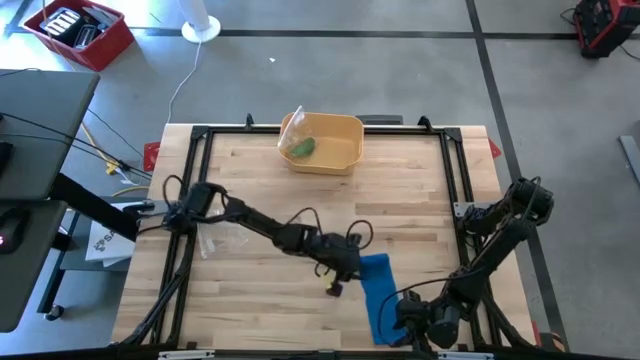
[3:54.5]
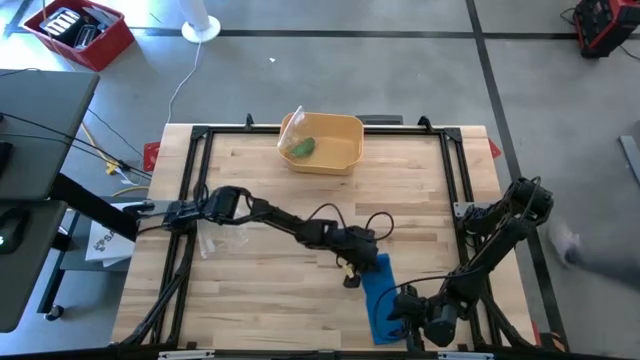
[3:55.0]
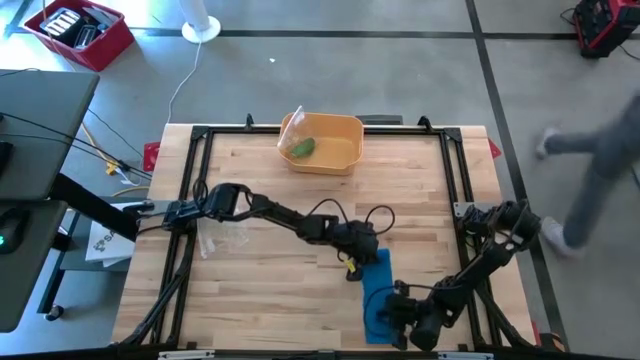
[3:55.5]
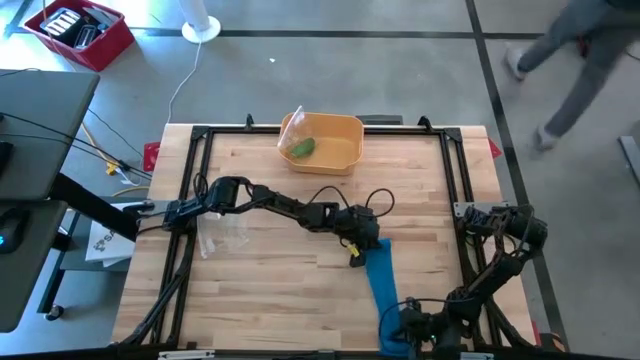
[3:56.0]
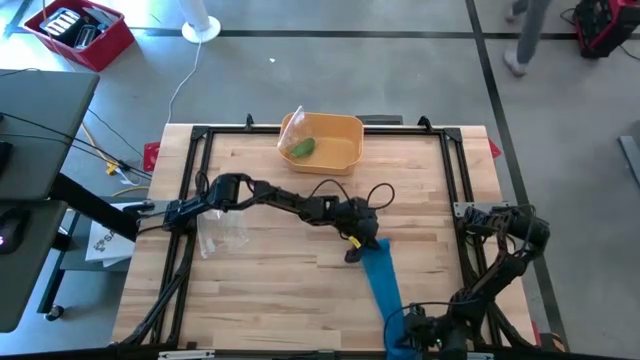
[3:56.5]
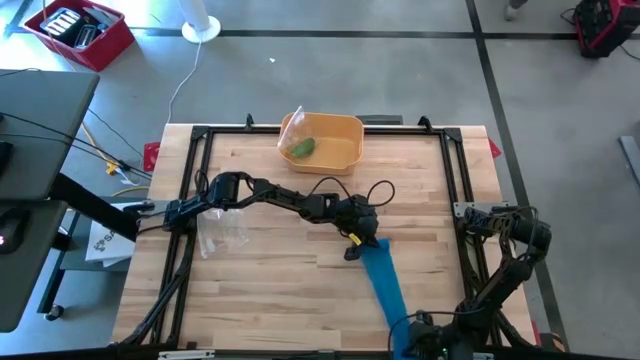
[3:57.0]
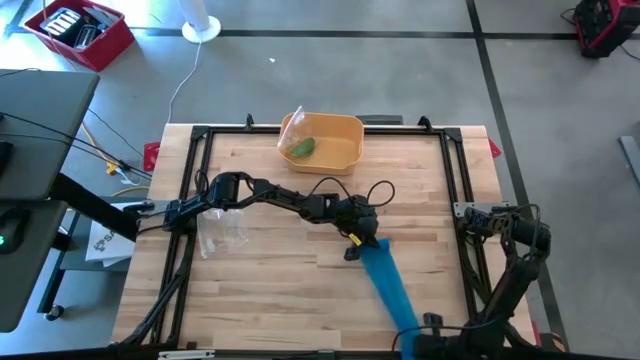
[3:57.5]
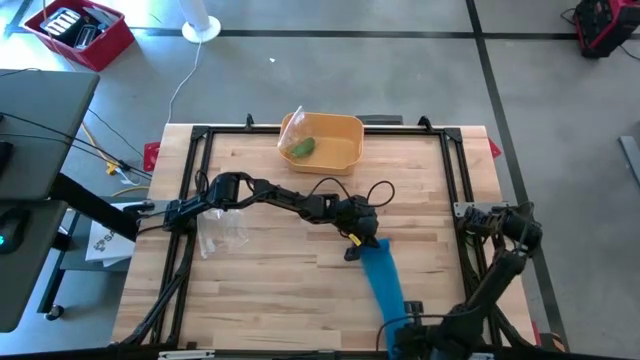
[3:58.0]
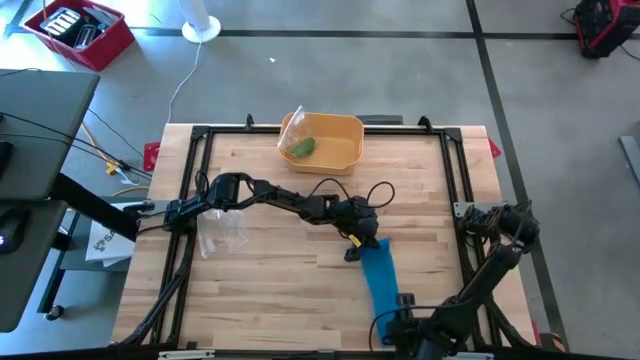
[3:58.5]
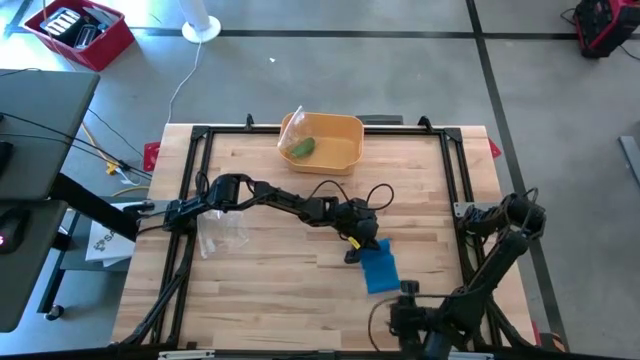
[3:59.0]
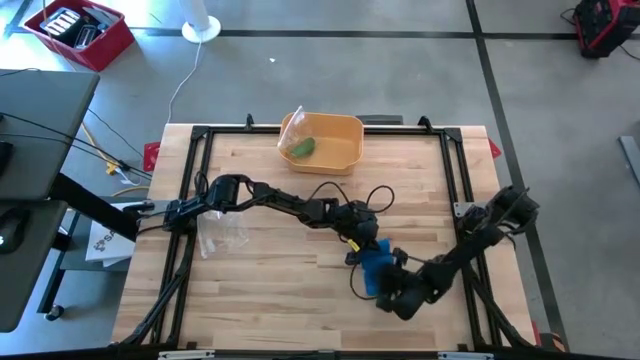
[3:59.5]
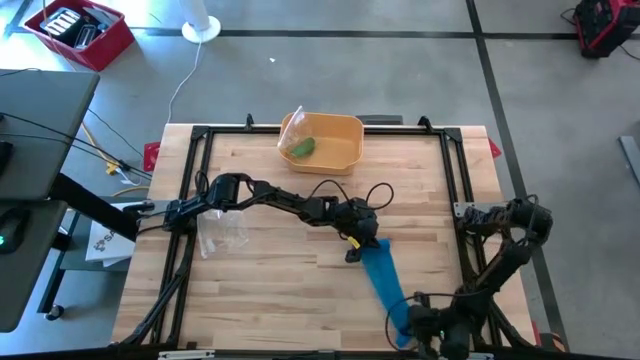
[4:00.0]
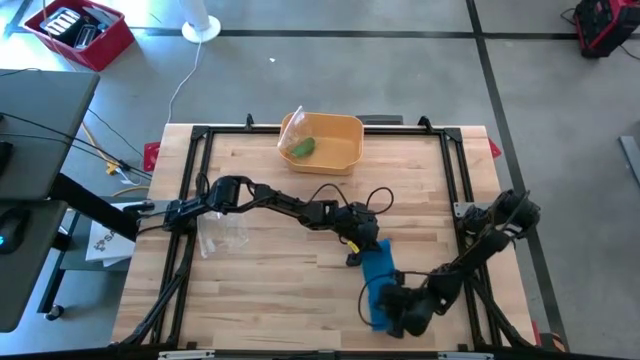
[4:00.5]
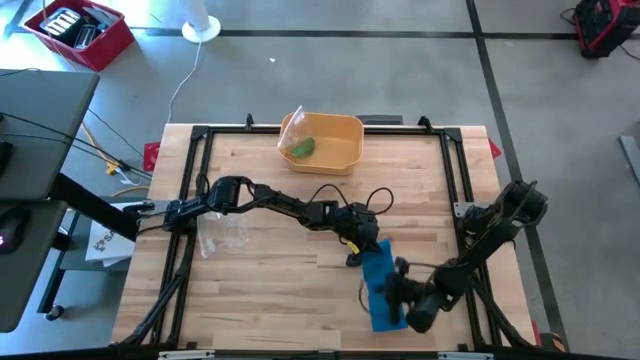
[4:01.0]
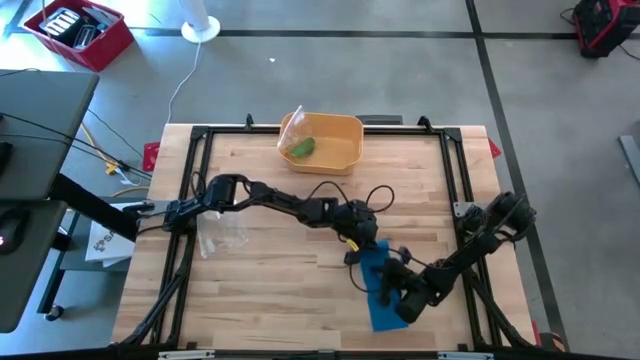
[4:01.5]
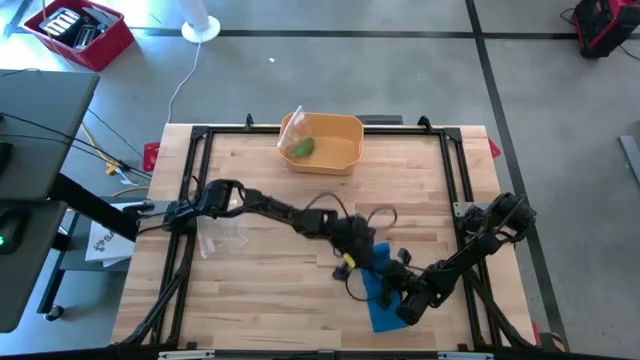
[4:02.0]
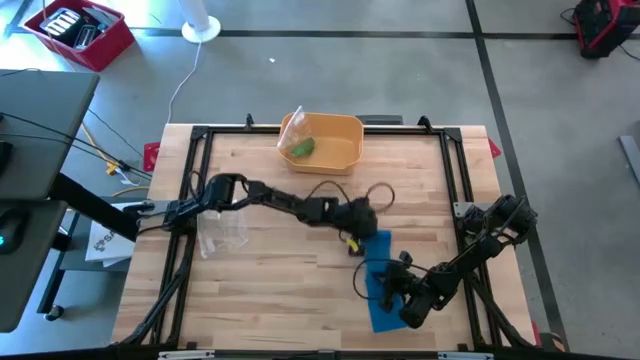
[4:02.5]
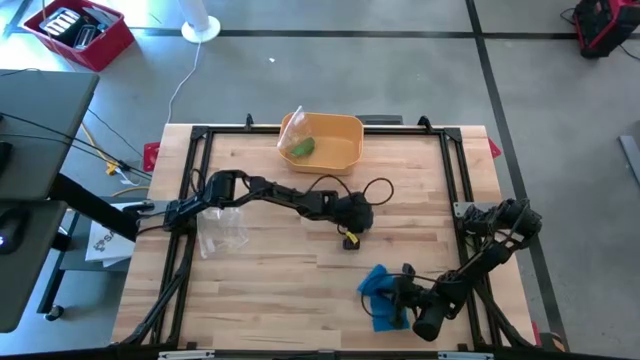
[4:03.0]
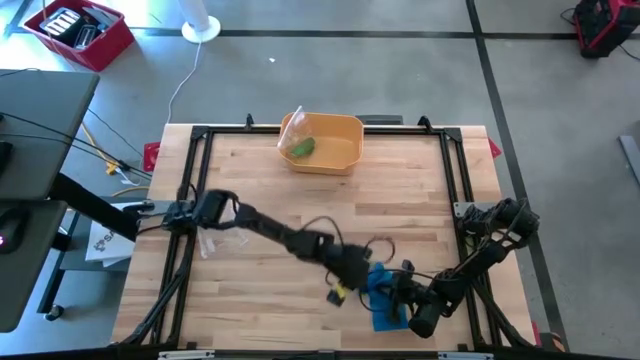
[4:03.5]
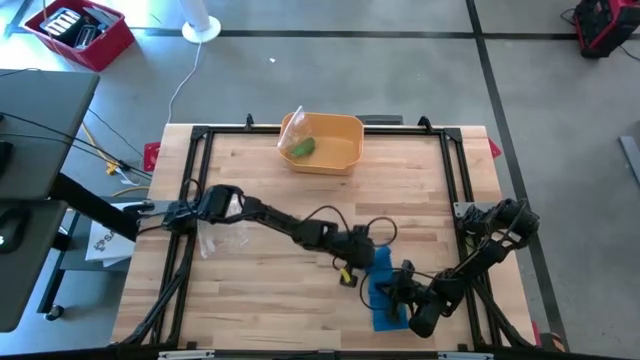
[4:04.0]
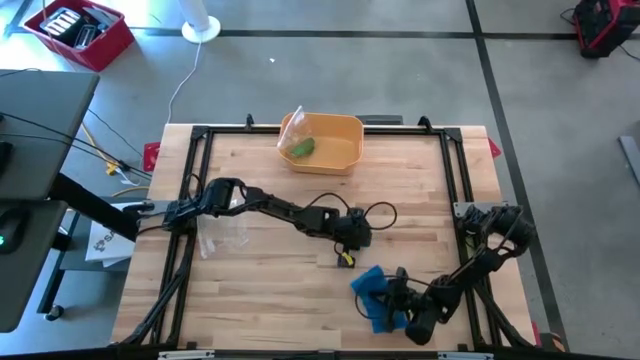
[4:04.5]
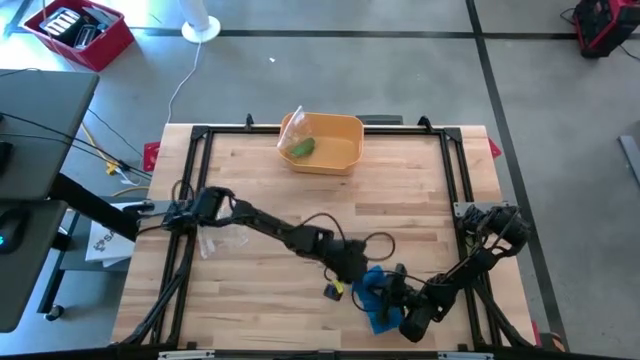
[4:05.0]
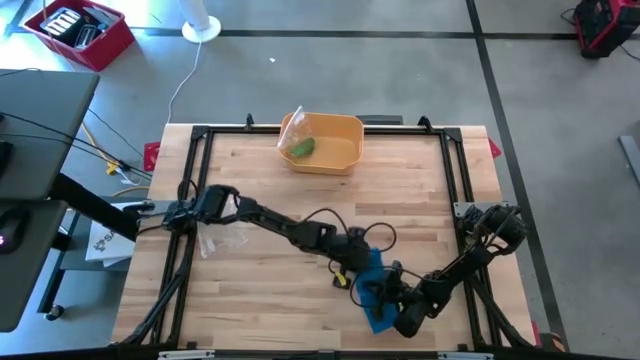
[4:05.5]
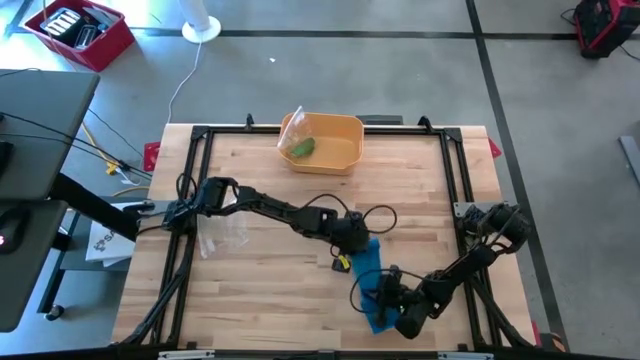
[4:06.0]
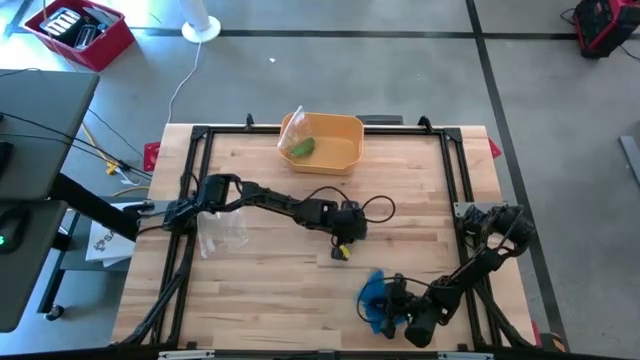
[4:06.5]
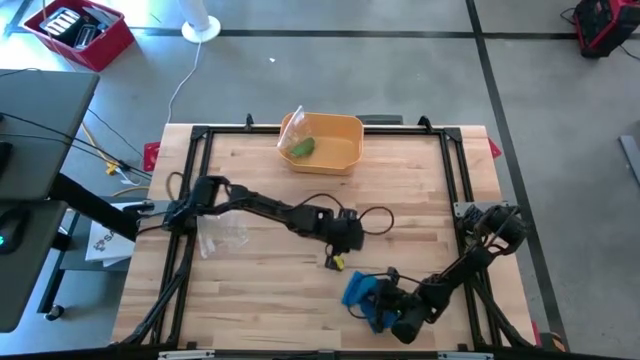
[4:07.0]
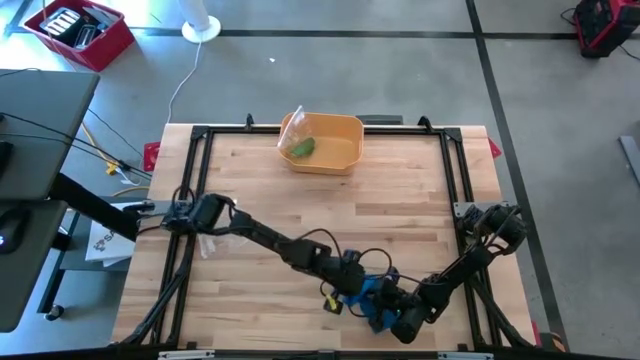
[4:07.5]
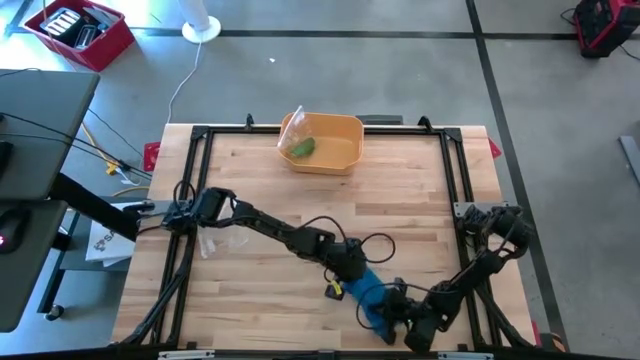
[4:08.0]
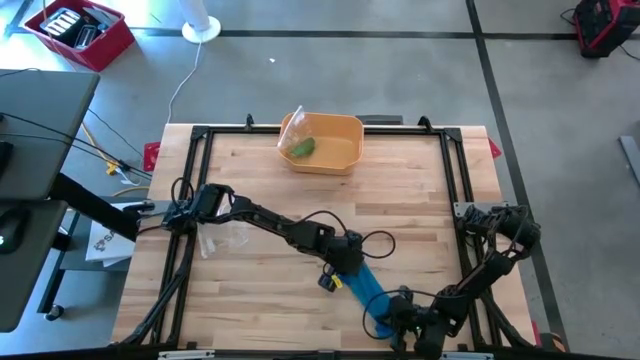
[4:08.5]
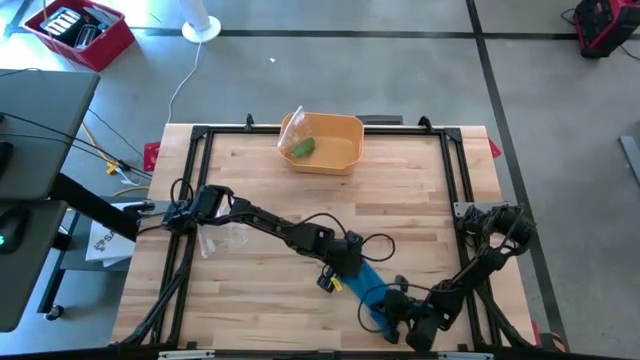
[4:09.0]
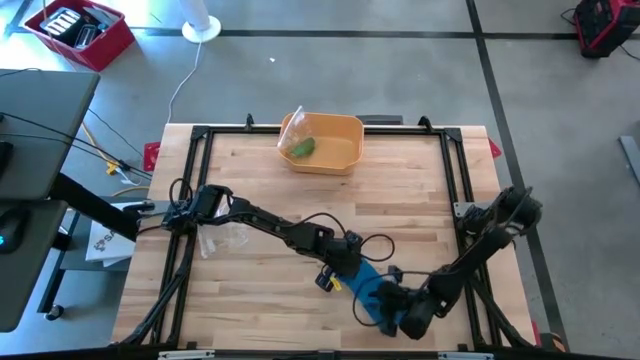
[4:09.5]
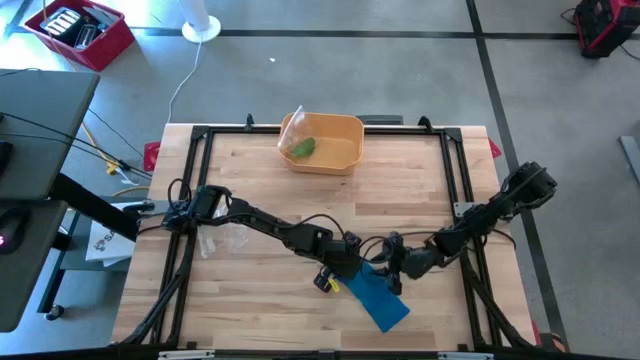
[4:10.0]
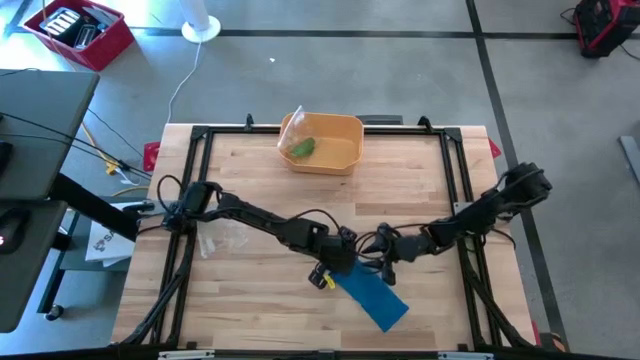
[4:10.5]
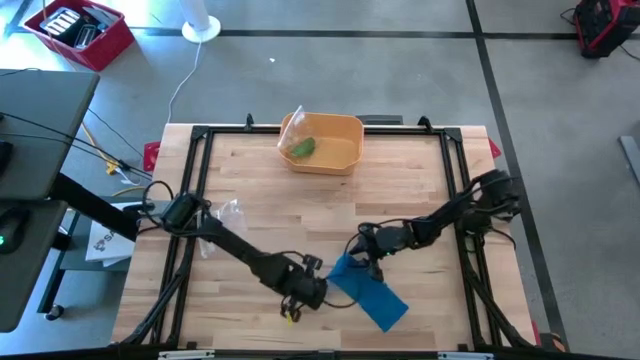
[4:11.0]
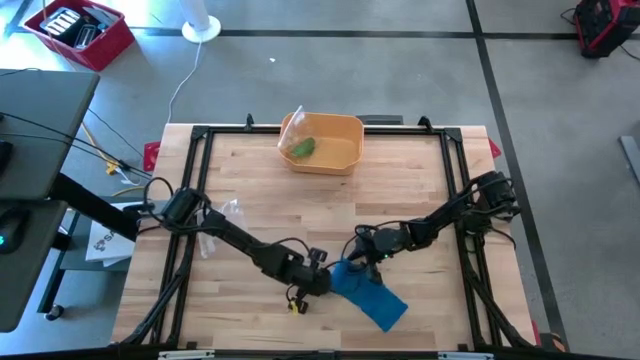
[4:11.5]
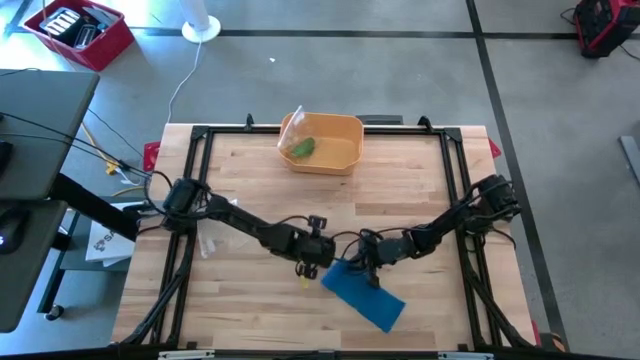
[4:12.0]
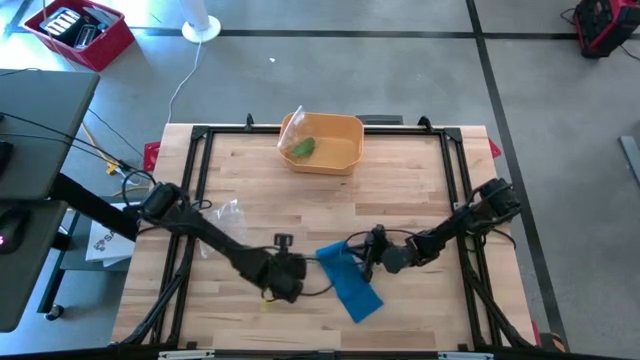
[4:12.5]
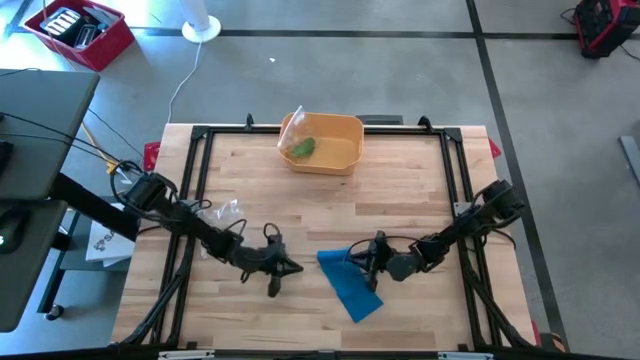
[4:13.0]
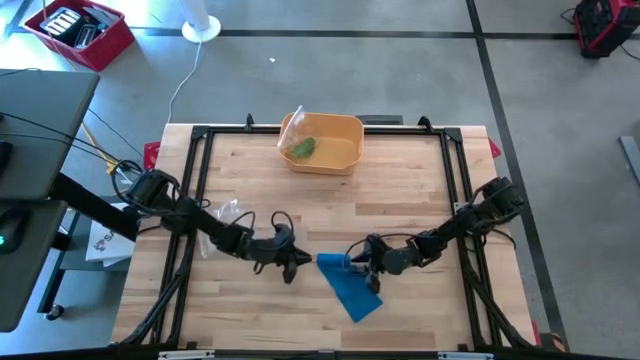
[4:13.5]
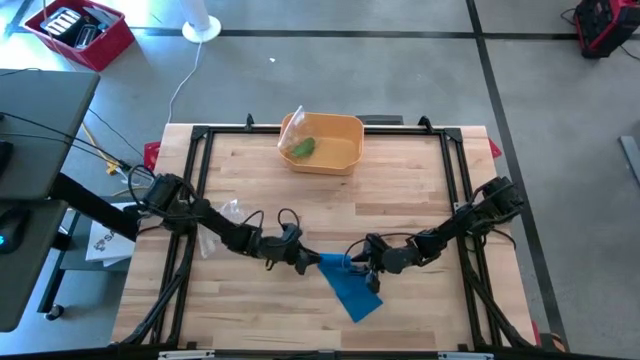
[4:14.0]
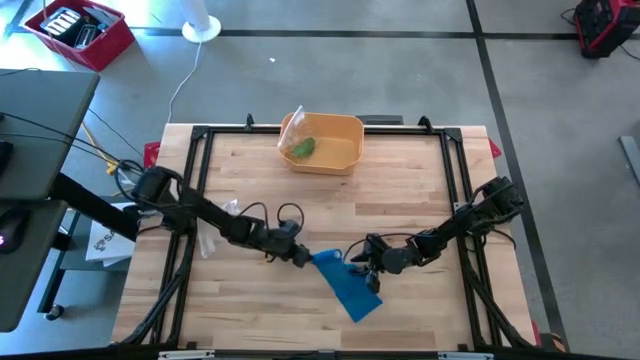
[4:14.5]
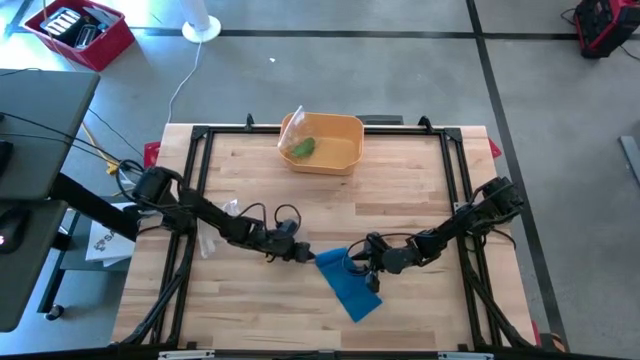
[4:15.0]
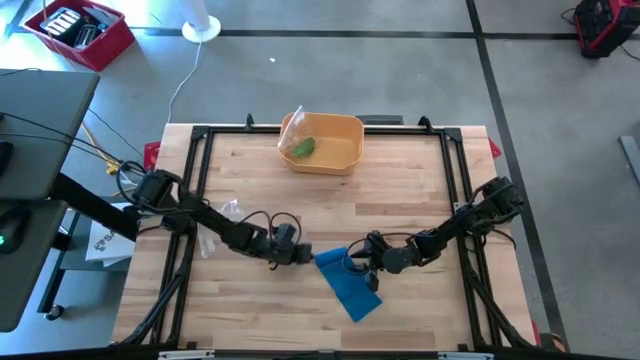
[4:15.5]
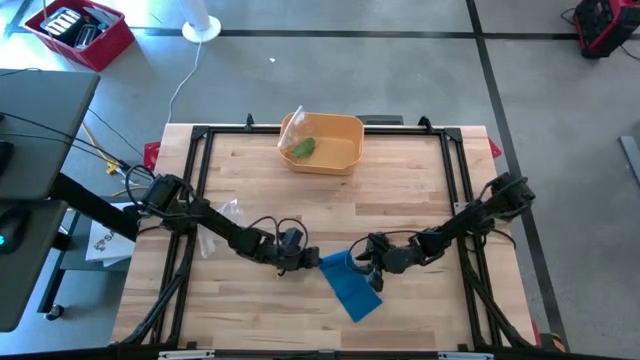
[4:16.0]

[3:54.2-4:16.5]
Task: Roll bandage
Roll the blue bandage
